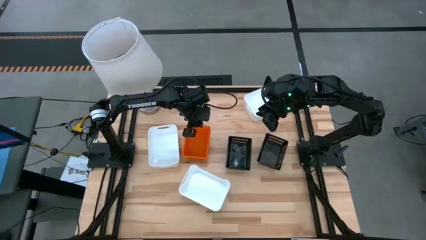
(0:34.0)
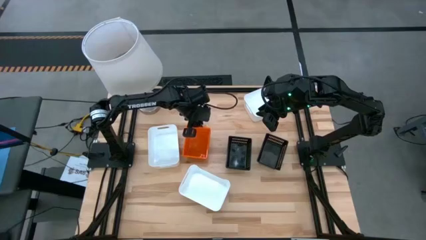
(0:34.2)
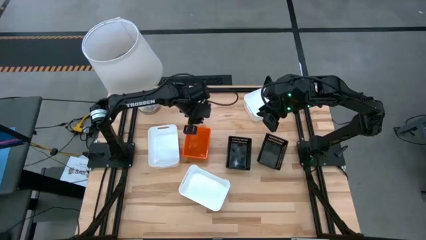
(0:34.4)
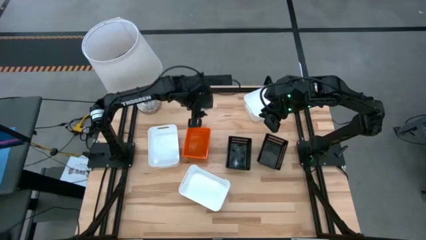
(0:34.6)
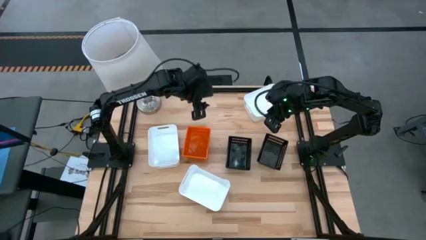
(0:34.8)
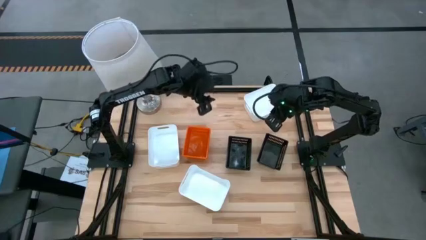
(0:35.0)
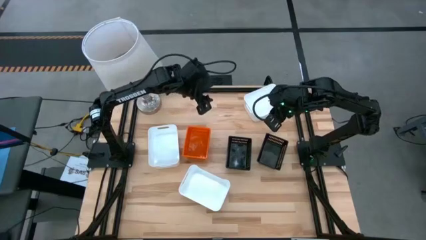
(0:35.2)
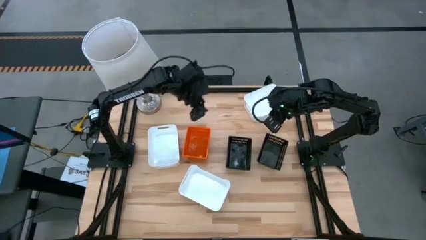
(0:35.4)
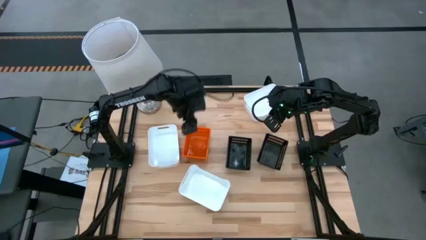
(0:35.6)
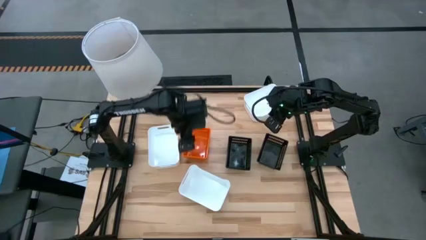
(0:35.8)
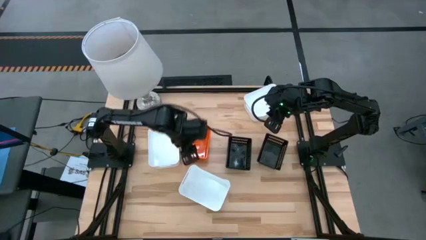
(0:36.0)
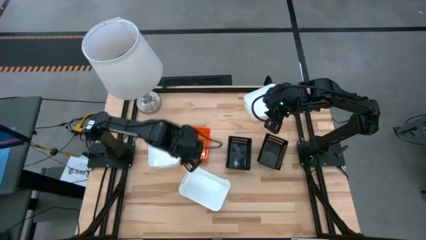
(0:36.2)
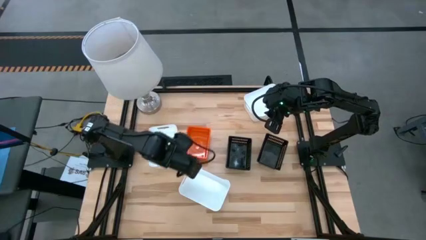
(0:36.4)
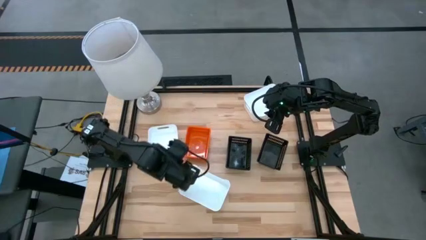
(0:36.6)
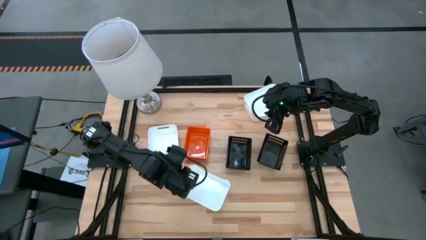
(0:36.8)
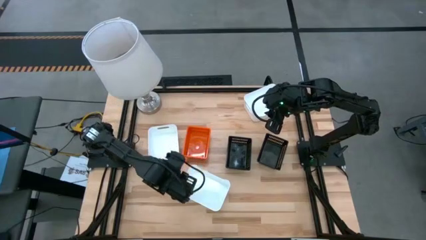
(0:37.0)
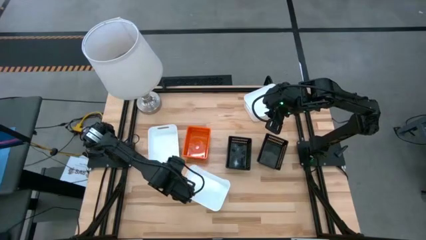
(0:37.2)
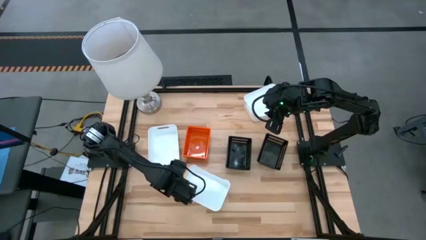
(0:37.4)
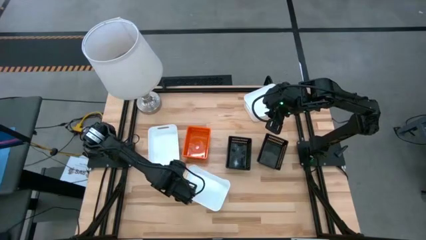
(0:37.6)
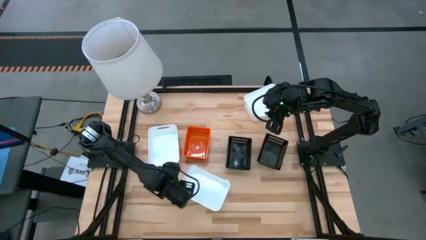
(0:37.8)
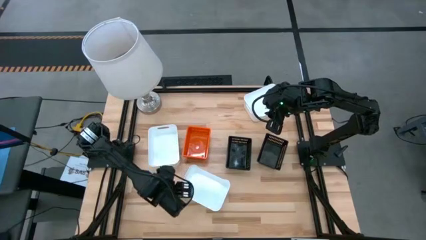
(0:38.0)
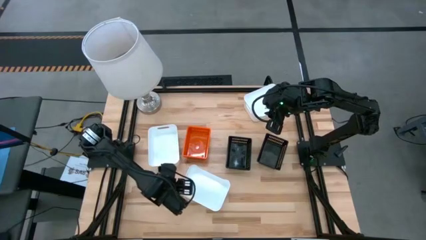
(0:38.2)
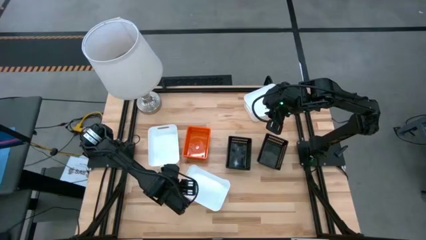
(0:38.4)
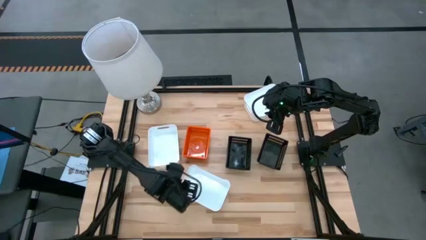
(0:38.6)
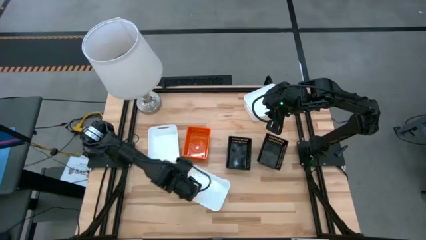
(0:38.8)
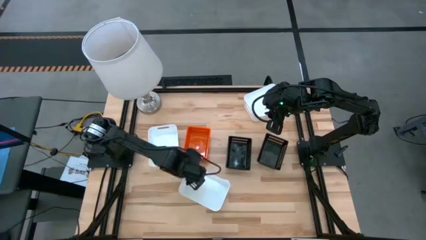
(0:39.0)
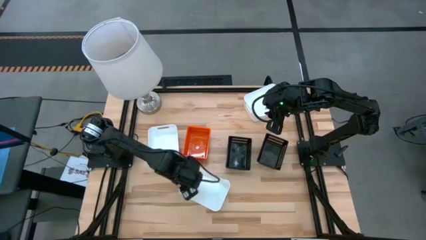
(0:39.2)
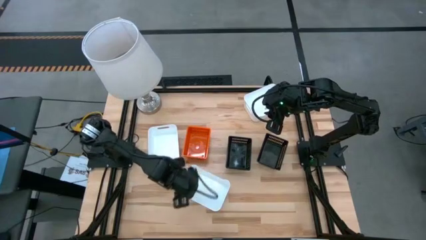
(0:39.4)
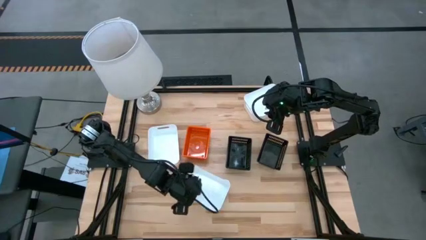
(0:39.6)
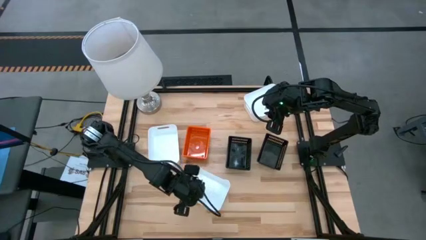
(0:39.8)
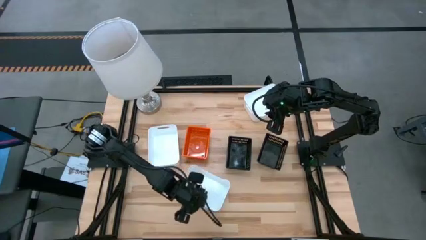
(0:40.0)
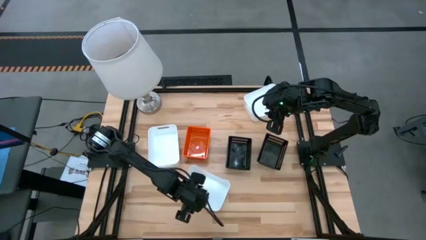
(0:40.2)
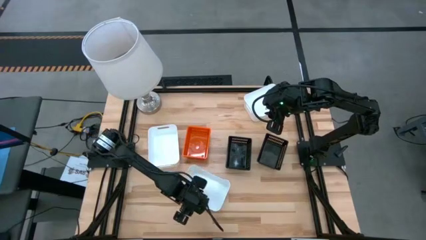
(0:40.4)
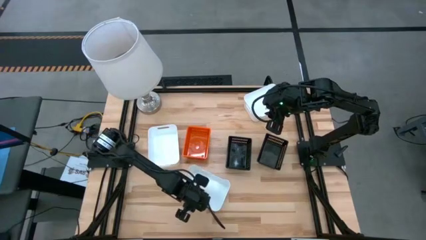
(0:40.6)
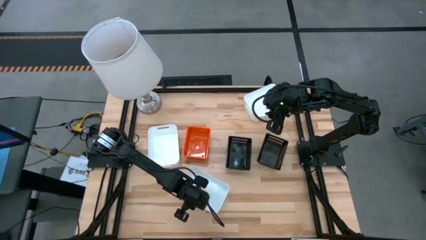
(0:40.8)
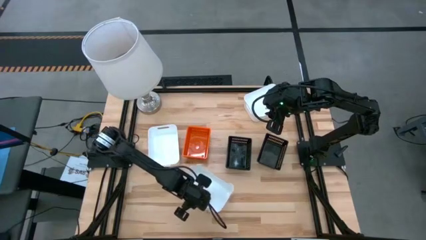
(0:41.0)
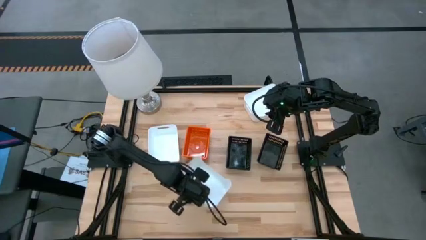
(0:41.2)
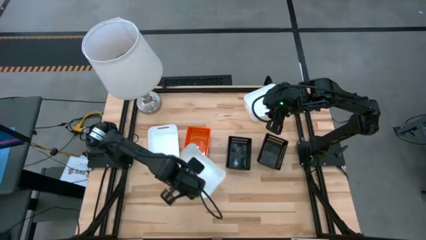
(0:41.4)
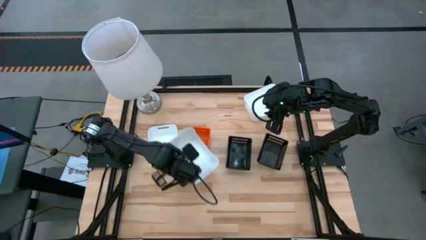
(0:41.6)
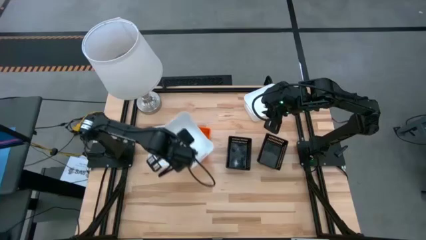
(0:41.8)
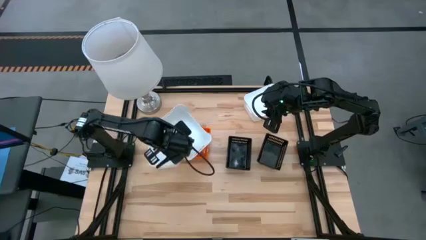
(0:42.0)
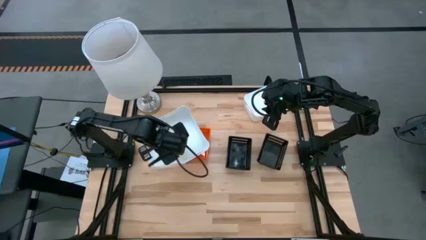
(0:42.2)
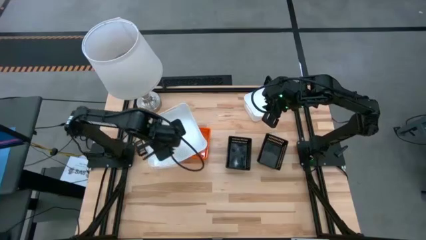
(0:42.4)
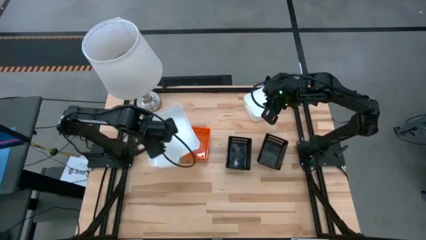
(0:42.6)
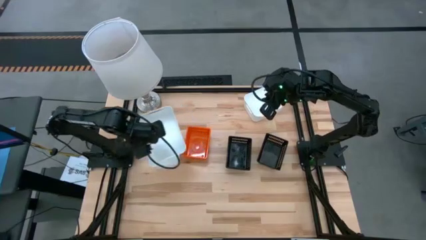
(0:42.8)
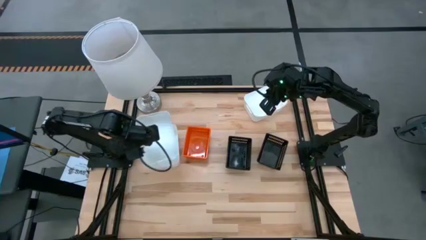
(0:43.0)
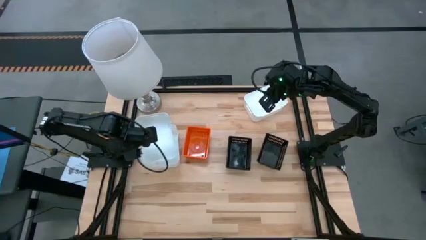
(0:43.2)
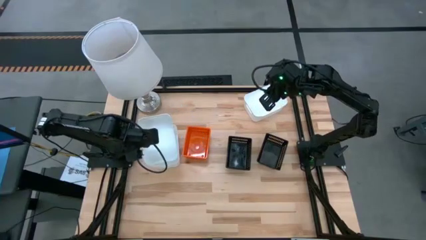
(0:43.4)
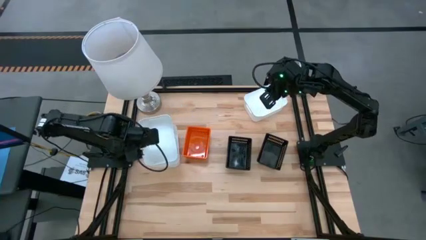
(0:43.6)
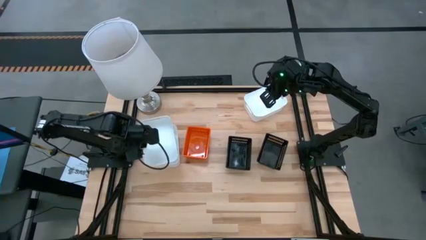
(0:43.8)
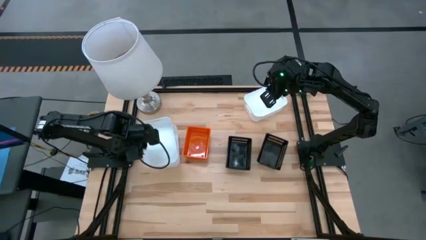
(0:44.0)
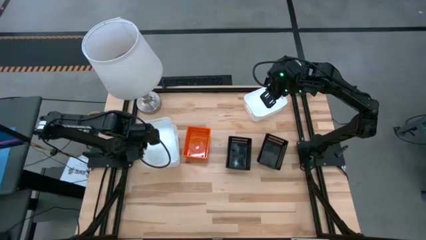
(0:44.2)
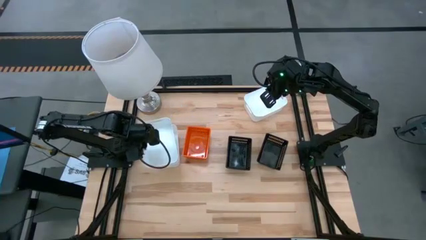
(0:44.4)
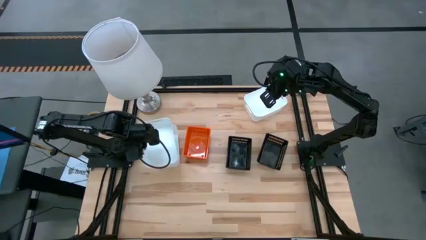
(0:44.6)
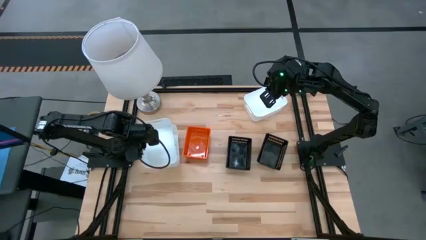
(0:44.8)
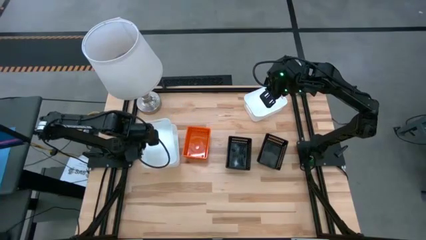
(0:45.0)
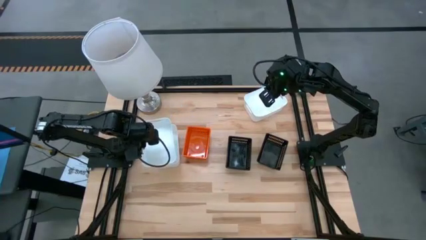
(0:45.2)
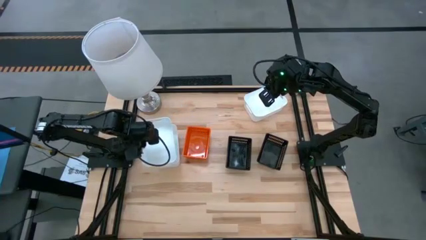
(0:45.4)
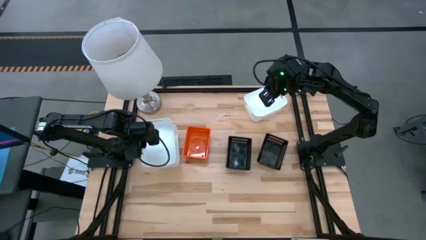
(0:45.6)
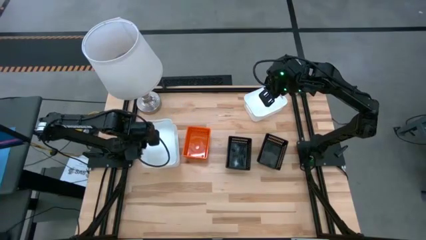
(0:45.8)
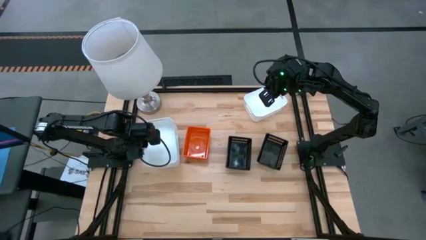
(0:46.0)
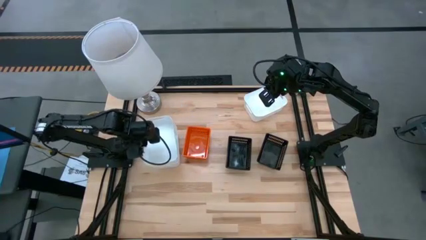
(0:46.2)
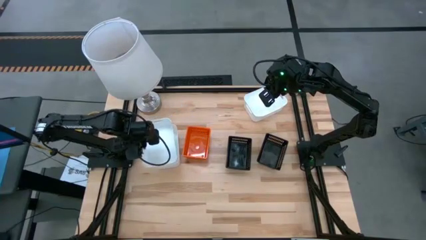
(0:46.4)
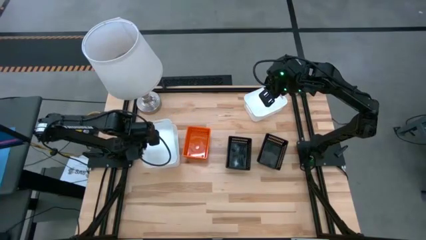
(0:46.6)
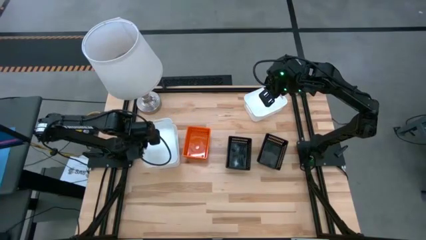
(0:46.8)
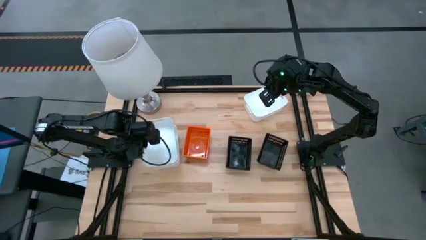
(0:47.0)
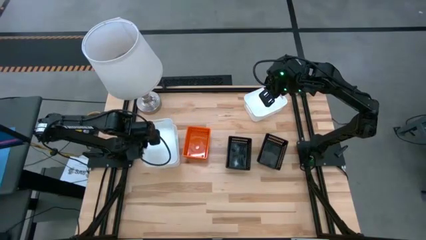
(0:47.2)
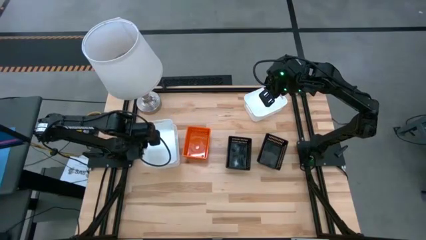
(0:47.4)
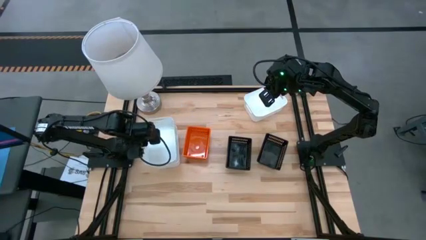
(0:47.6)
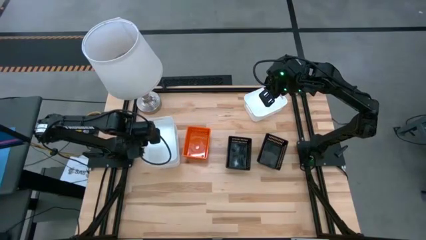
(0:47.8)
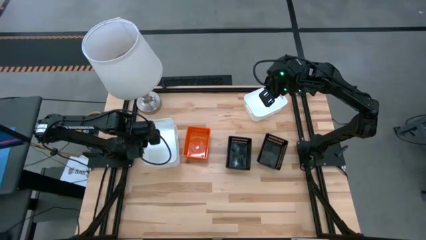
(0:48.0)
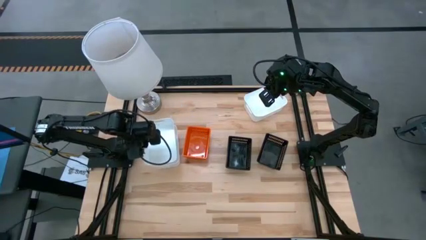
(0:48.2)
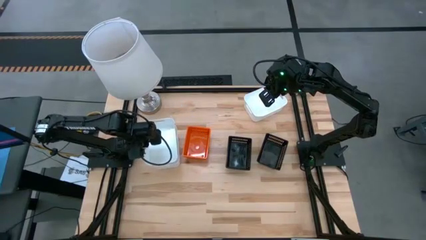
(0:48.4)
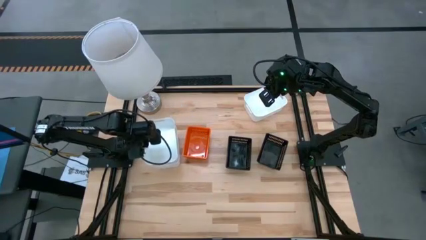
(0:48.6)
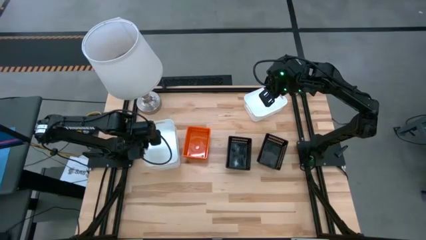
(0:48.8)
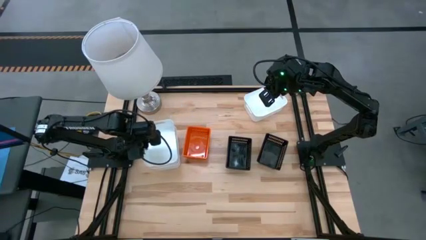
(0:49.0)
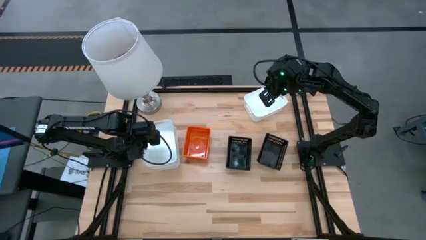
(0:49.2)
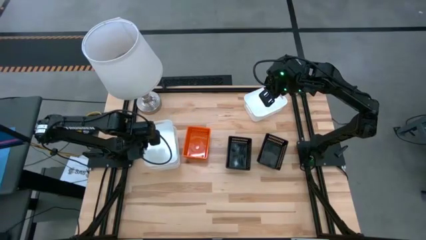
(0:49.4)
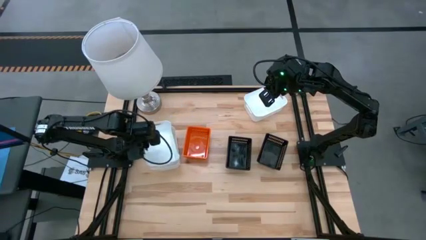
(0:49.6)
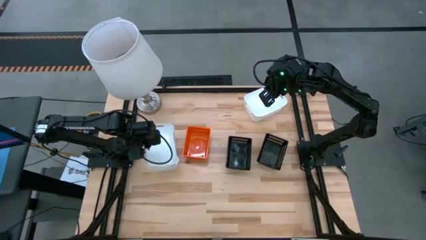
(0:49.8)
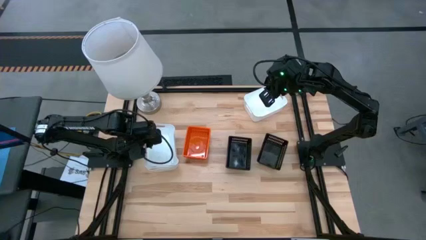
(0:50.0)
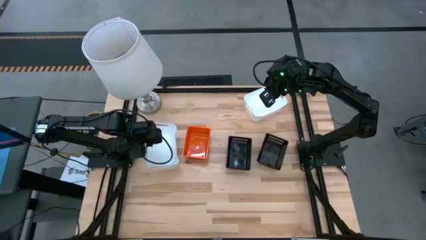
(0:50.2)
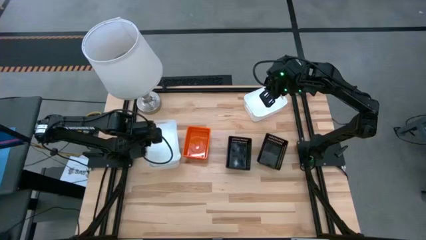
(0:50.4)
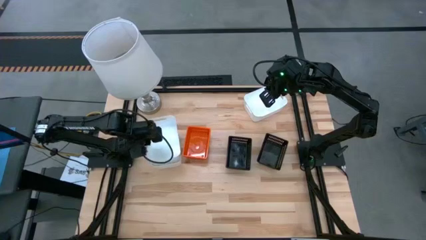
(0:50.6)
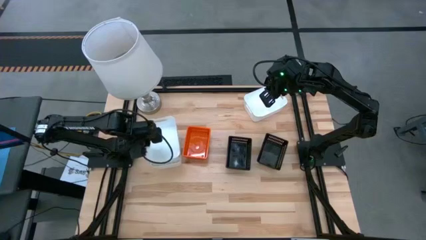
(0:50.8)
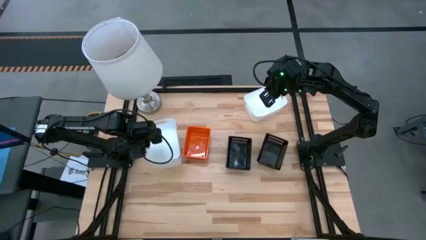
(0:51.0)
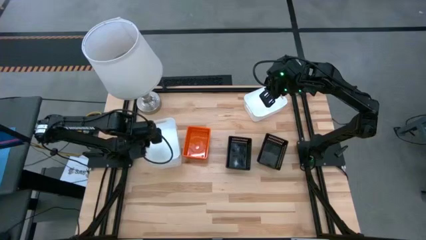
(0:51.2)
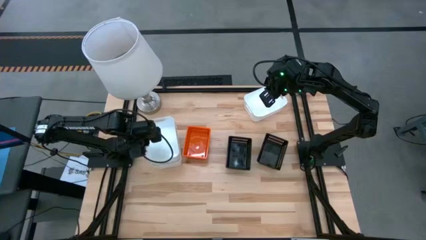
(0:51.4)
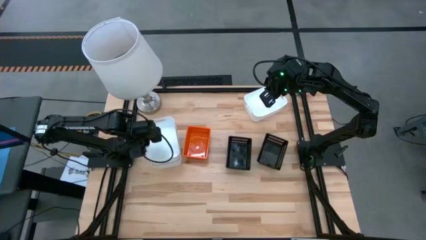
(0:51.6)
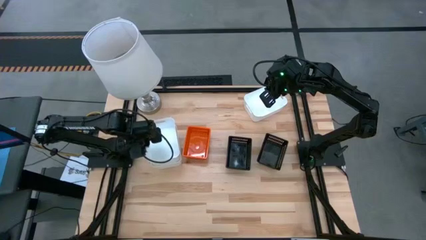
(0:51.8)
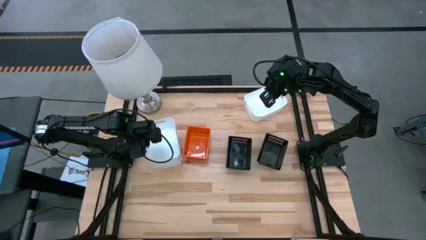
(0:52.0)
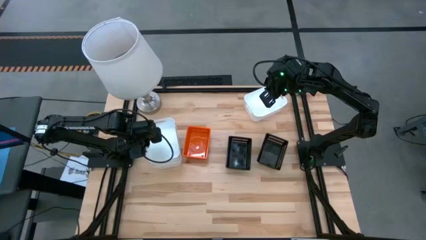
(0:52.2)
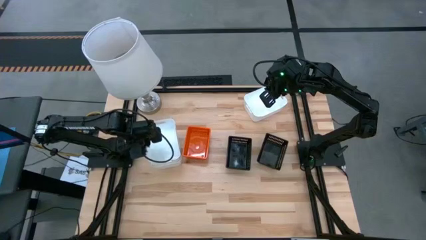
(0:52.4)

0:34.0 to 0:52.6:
Stack the bottom white bin on top of the middle left white bin
